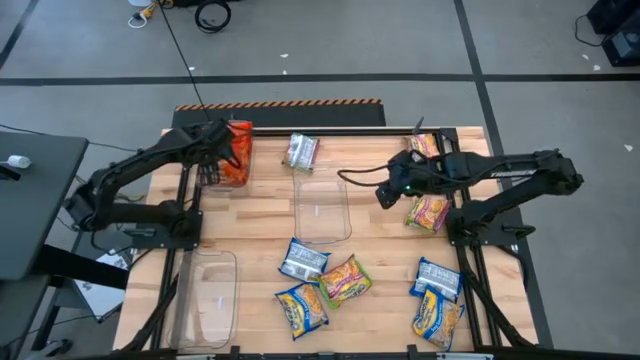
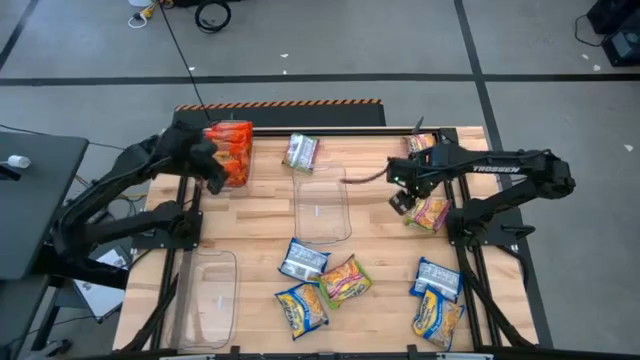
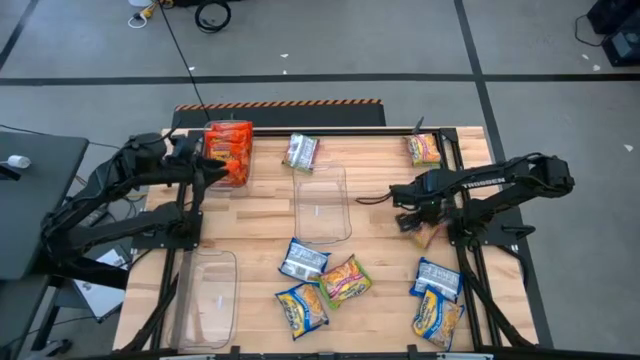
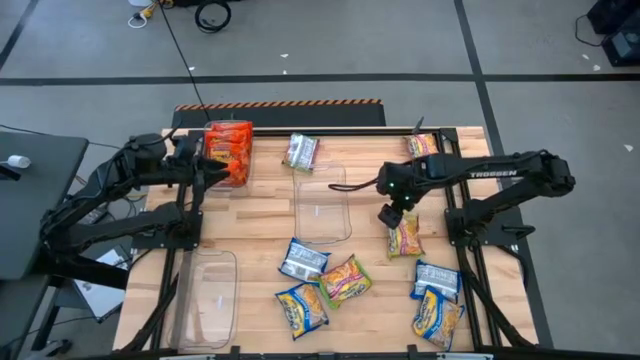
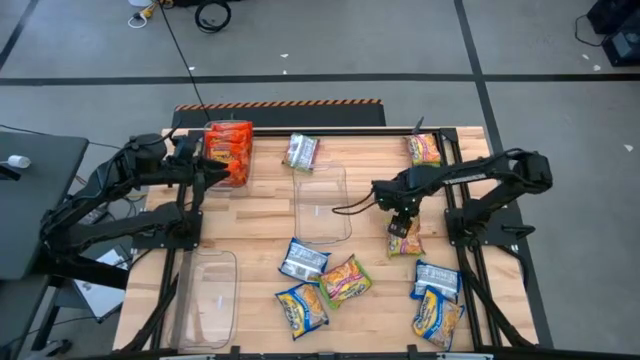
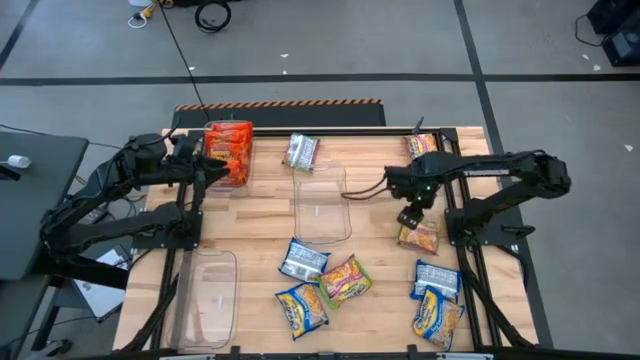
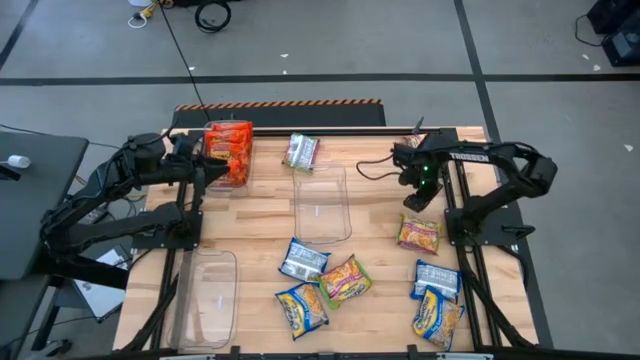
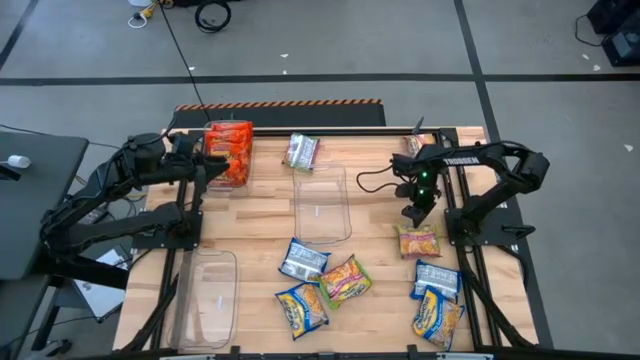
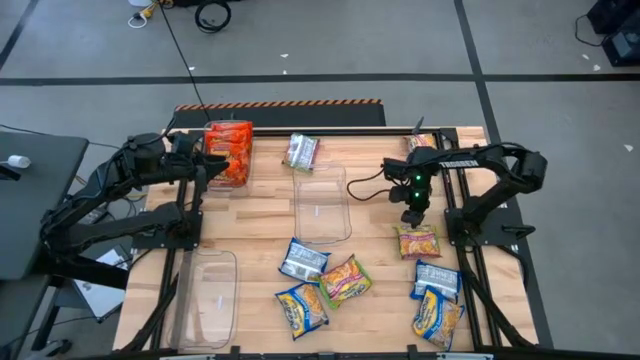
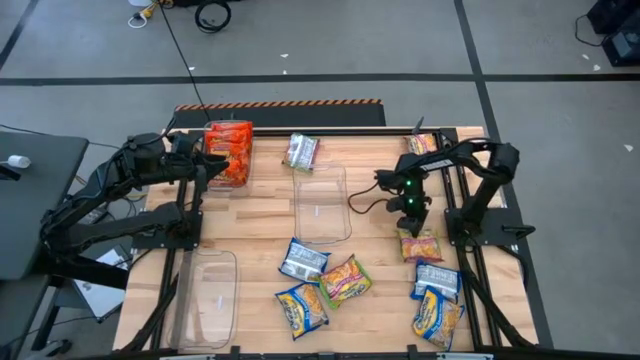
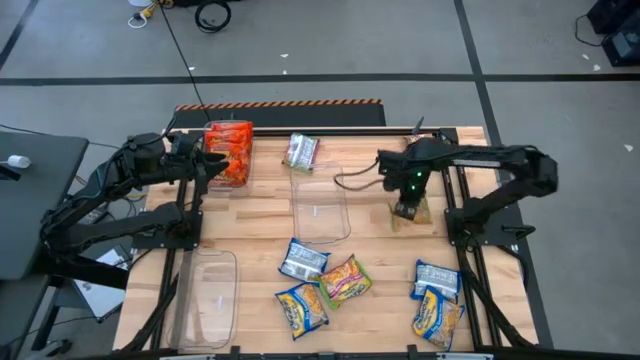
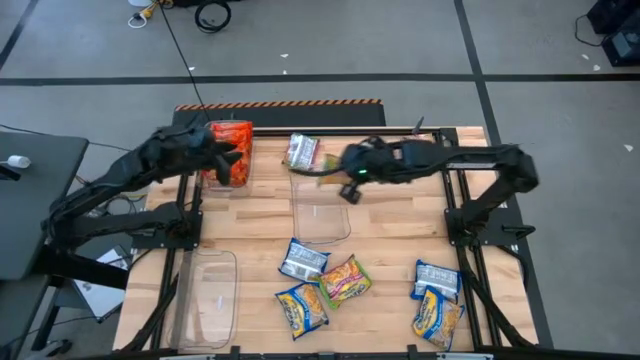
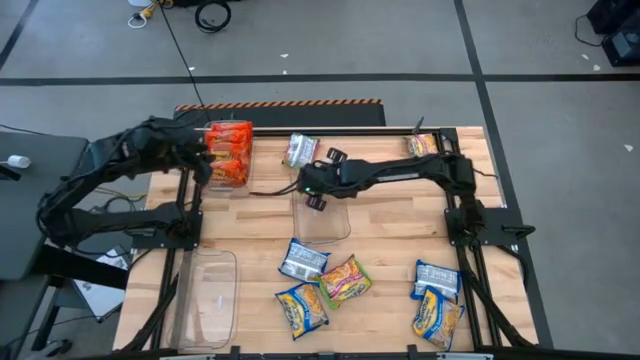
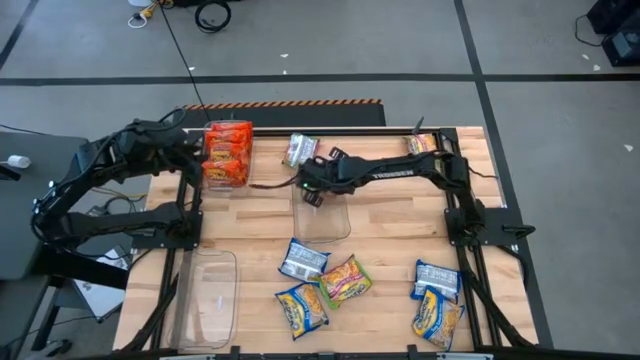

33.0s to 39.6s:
Task: Sort Maruchan noodles
Put the middle right green noodle pack into the center transparent bin

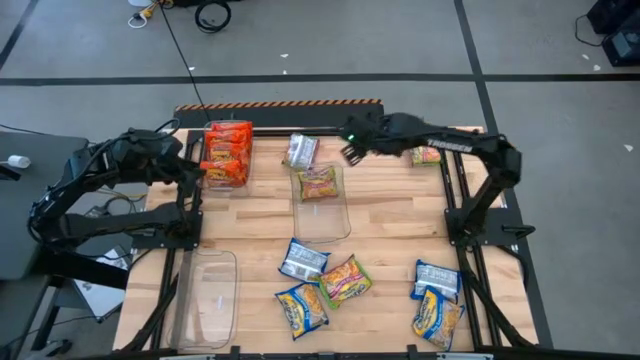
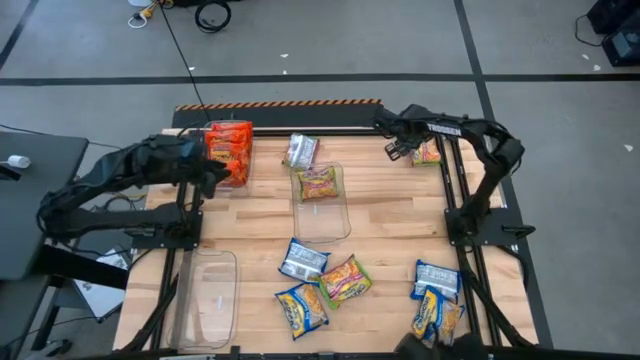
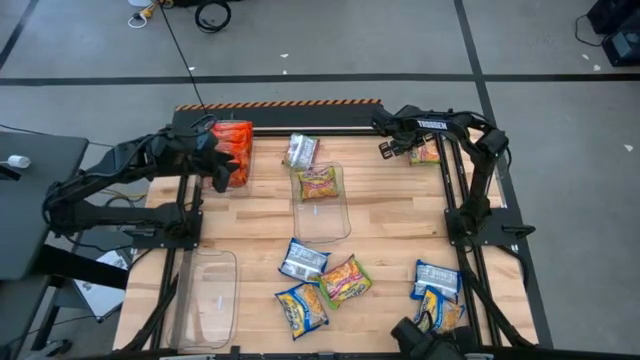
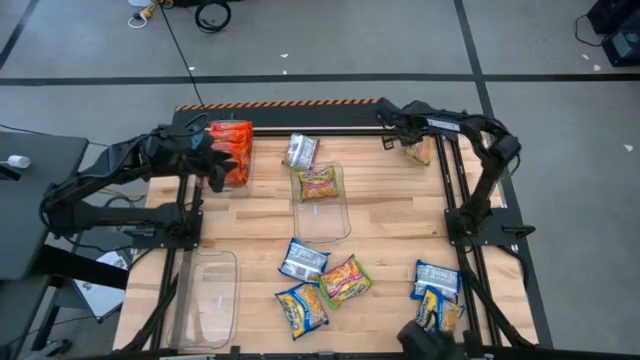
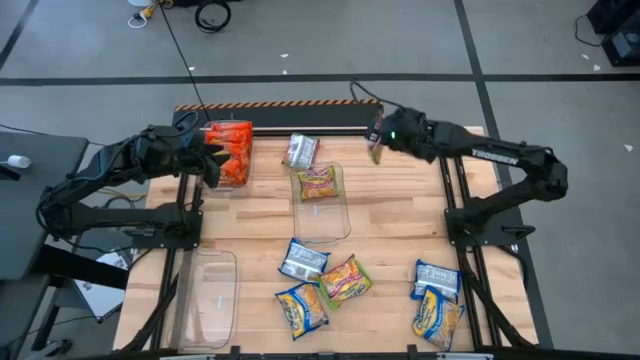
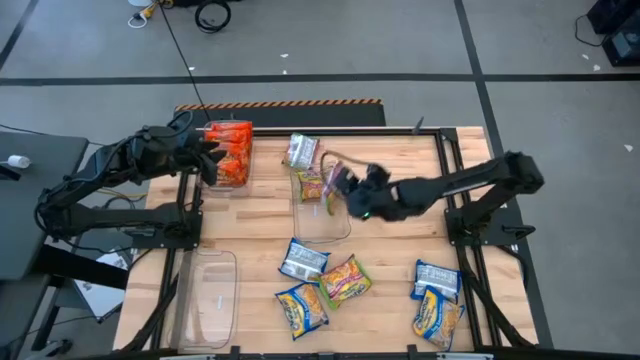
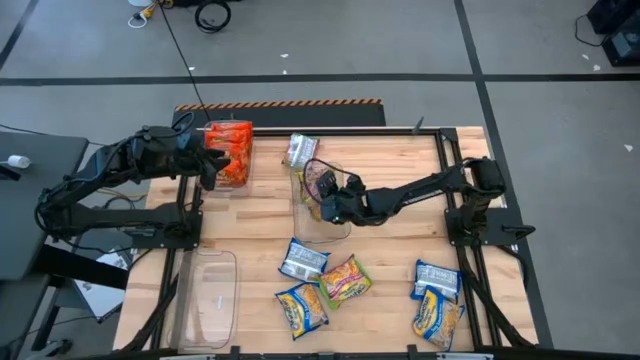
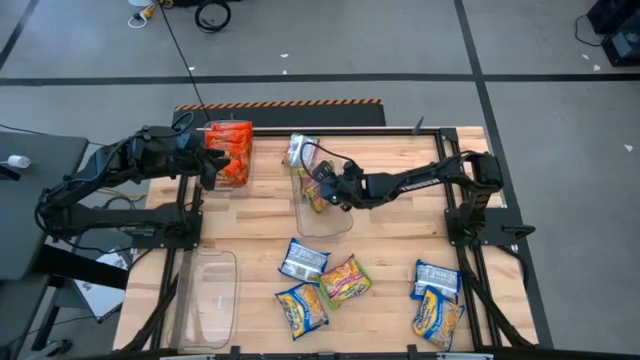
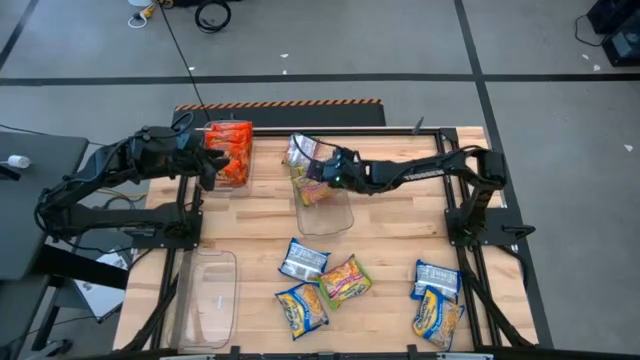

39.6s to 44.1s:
Put the top right green noodle pack into the center transparent bin

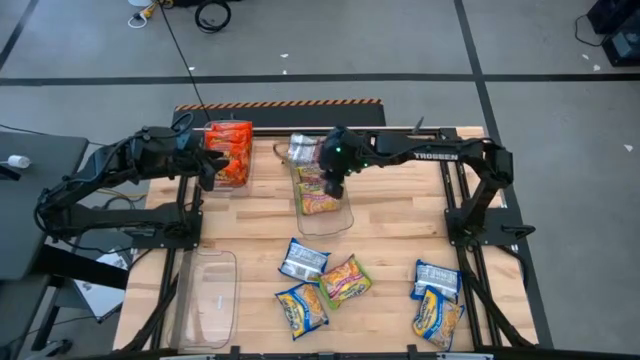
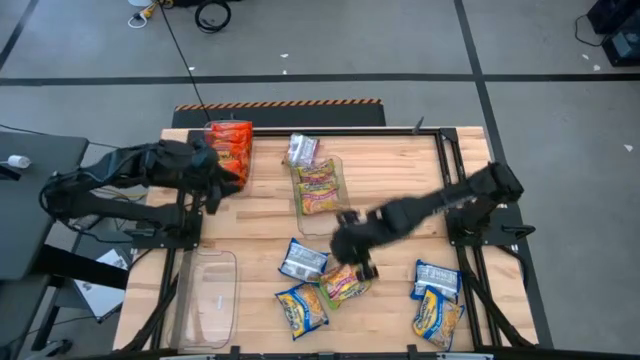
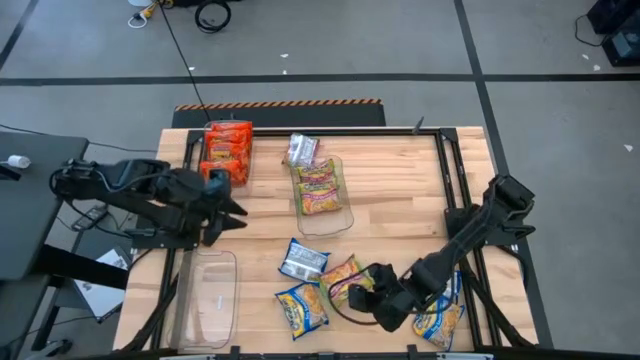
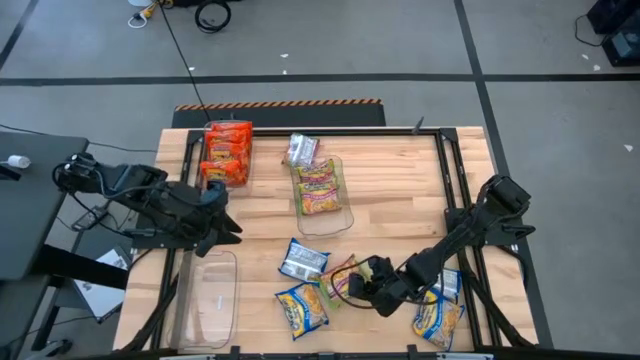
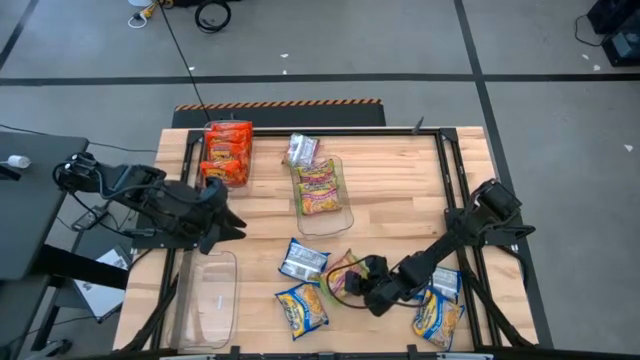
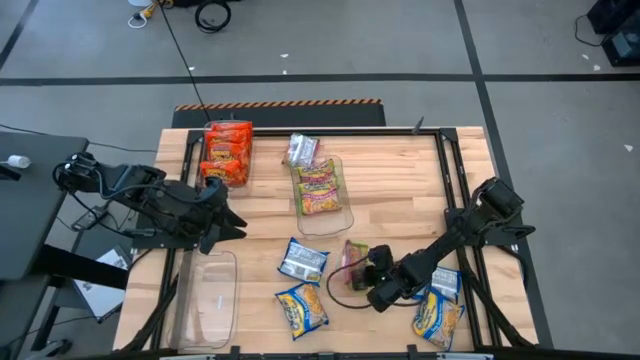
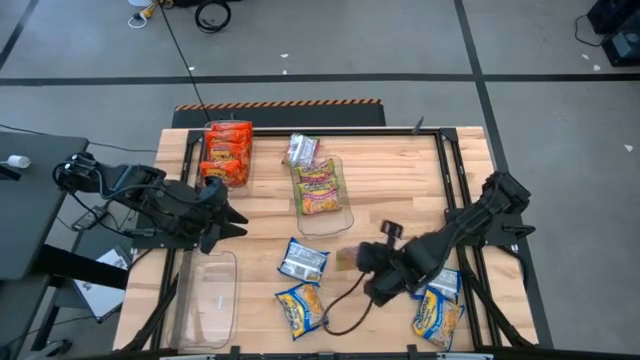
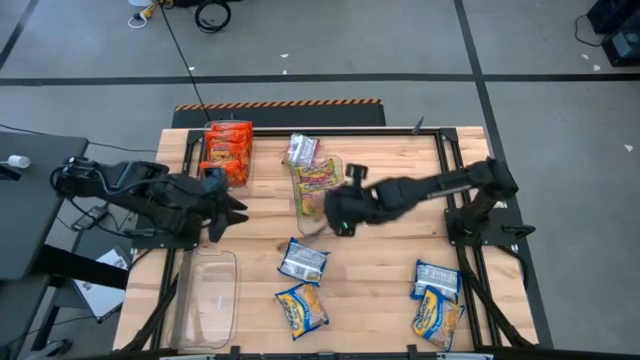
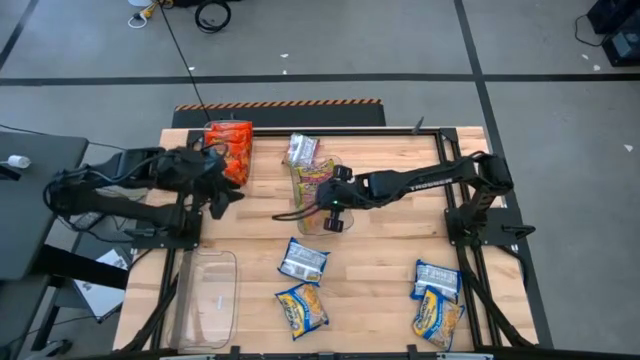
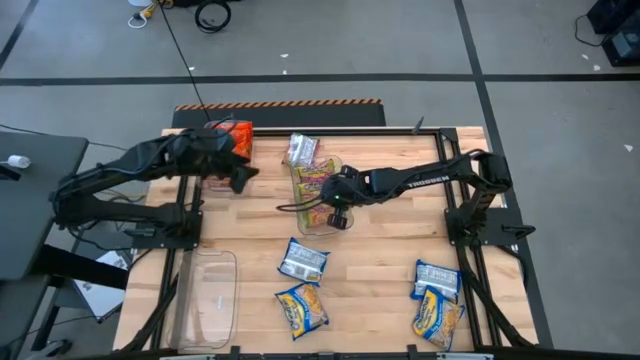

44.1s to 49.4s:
Put the bottom green noodle pack into the center transparent bin

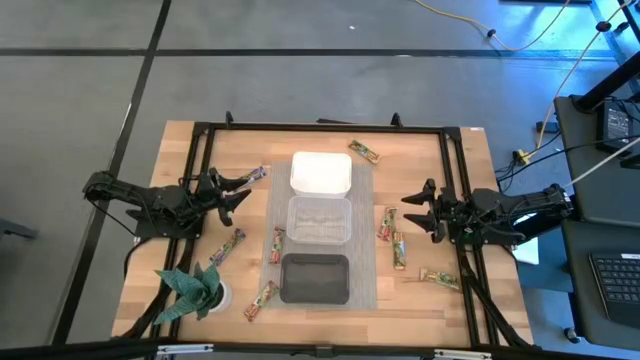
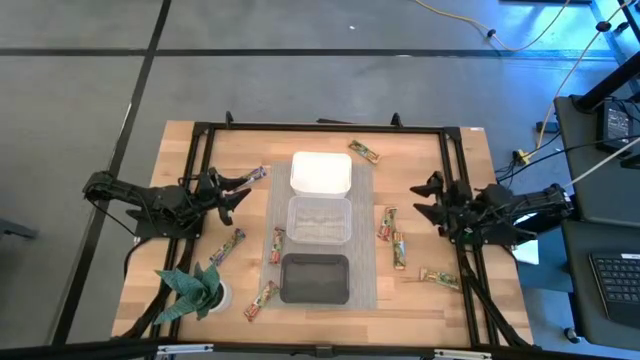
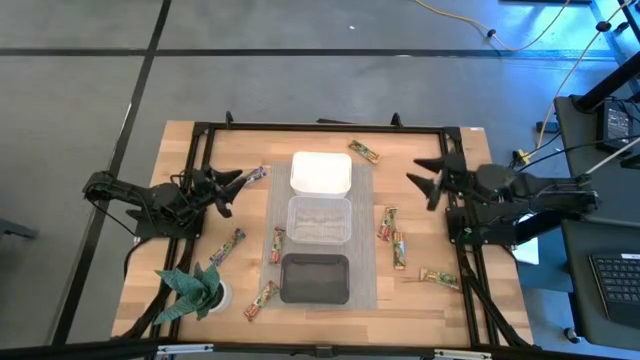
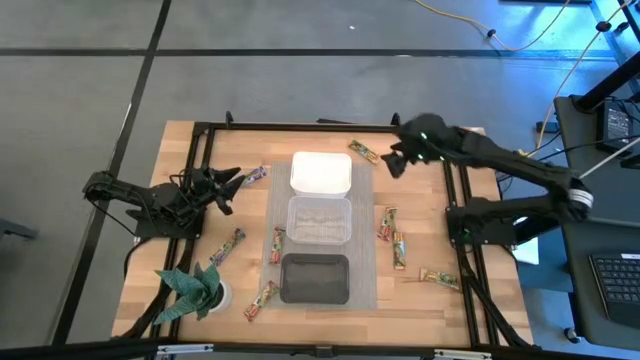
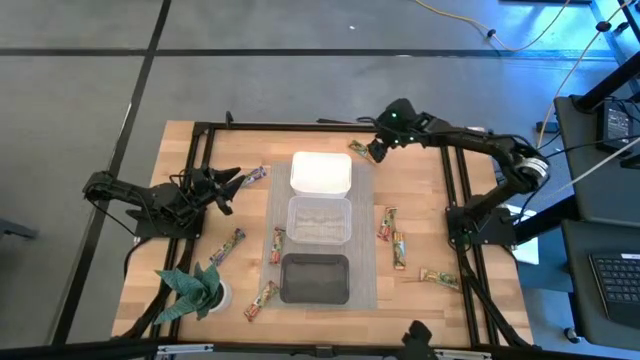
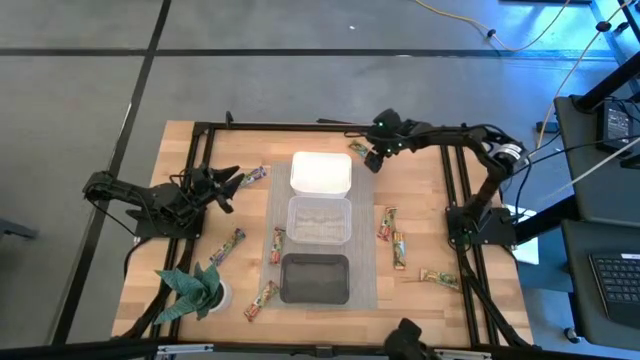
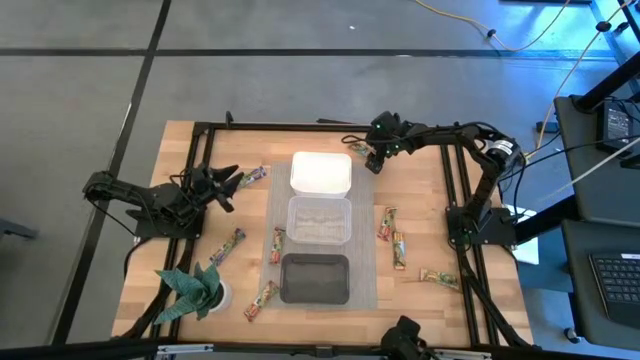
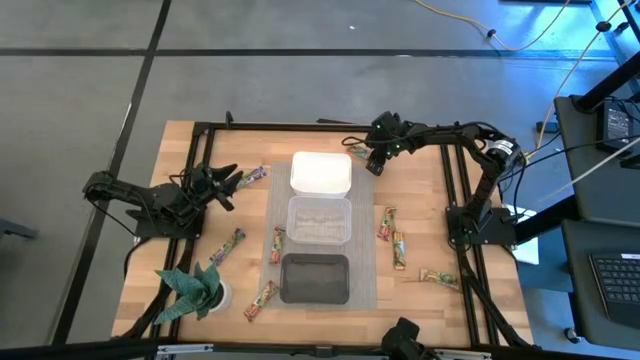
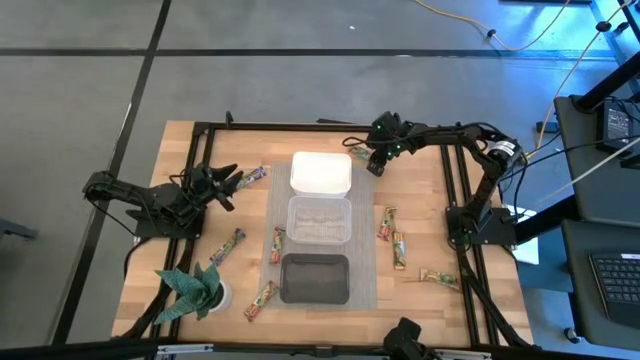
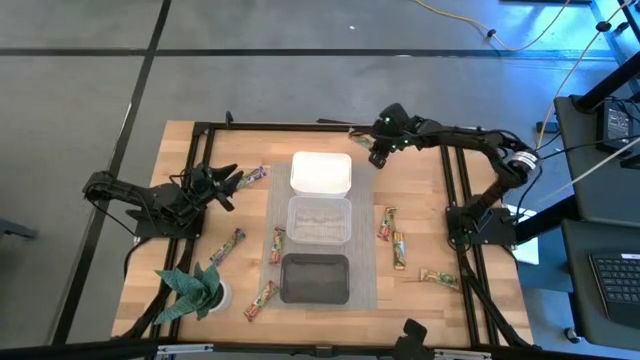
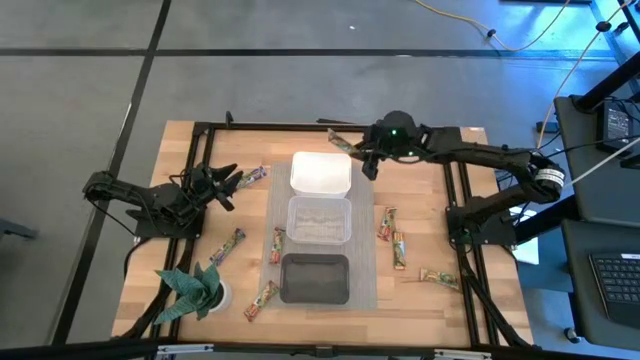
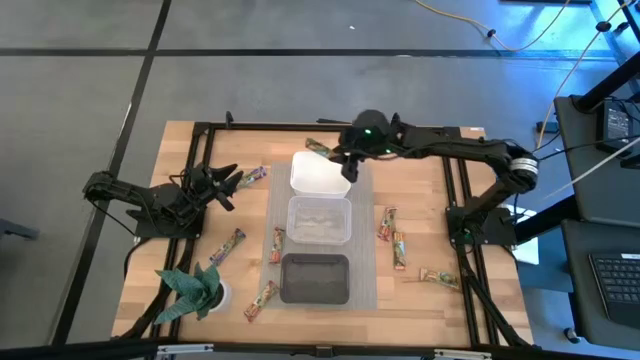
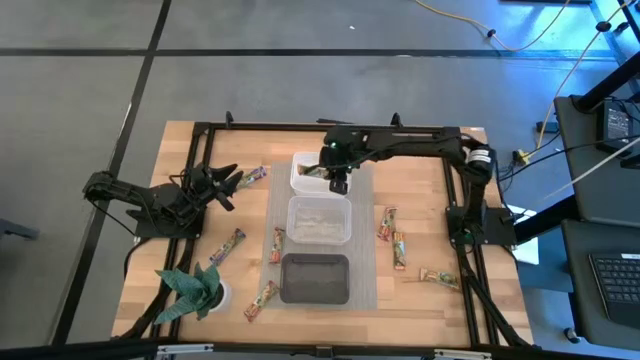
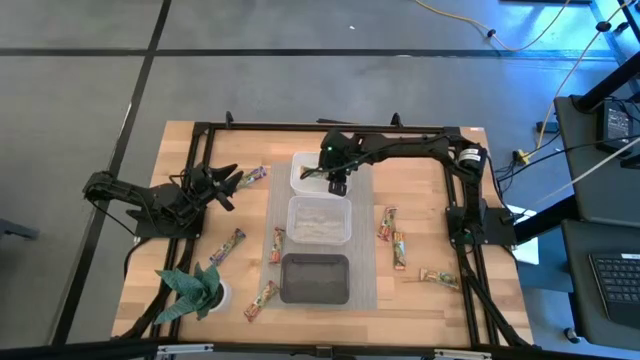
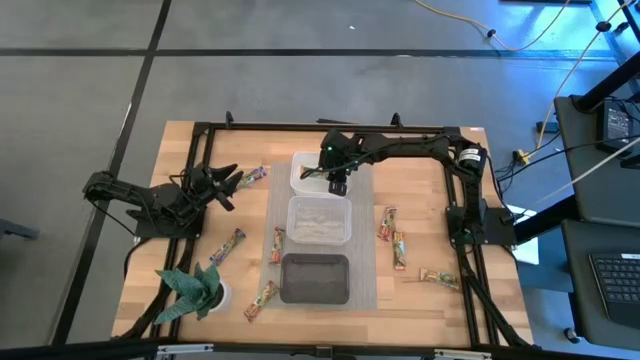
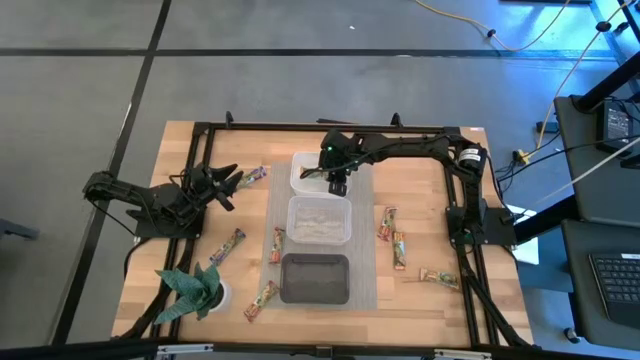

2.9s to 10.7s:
Task: Pick and place Granola Bars by type
Put the top left yellow granola bar into the white bin
